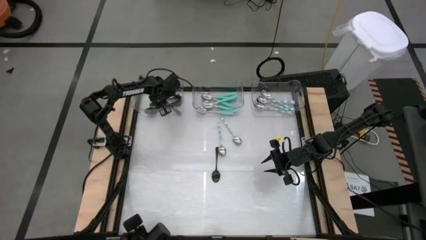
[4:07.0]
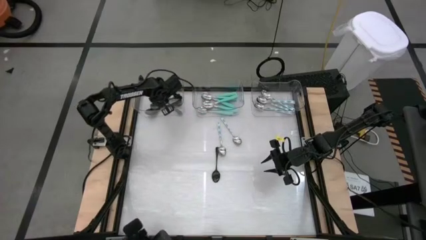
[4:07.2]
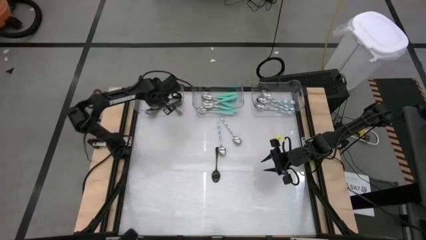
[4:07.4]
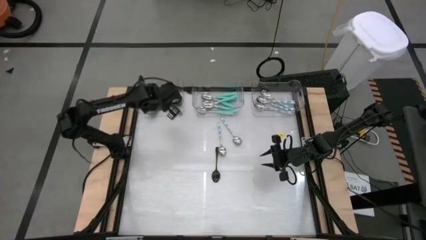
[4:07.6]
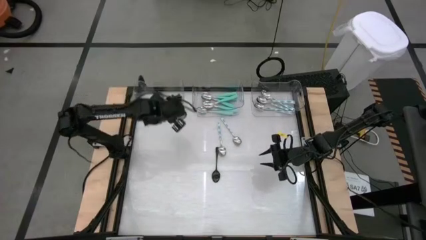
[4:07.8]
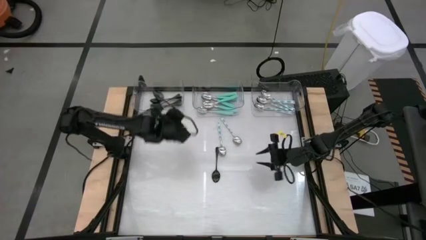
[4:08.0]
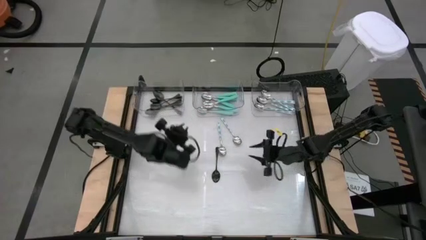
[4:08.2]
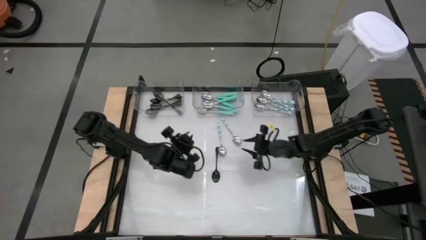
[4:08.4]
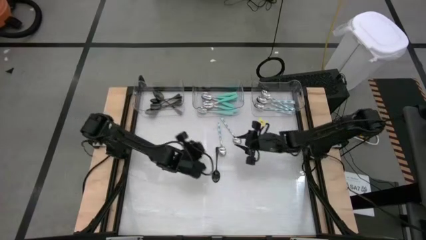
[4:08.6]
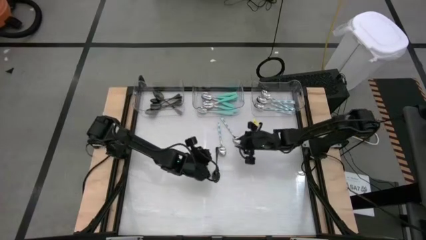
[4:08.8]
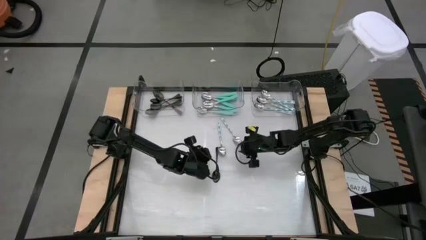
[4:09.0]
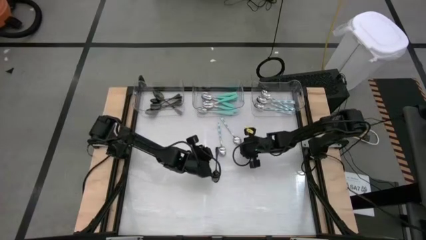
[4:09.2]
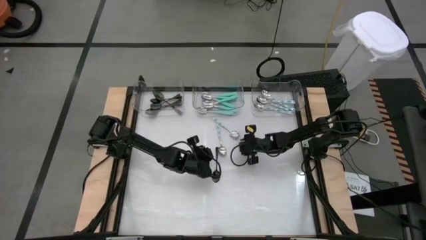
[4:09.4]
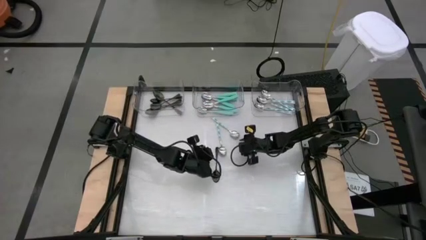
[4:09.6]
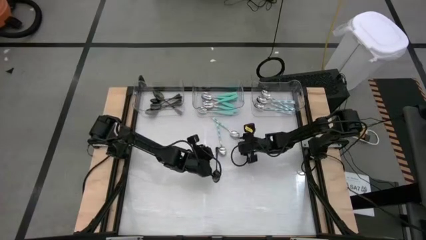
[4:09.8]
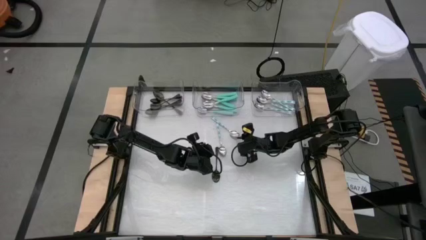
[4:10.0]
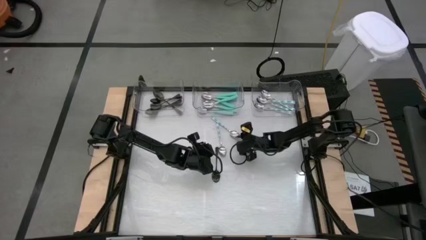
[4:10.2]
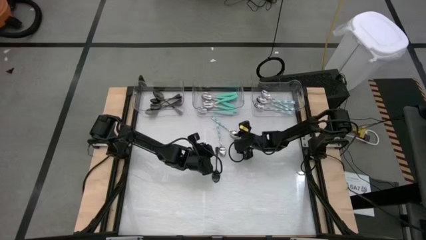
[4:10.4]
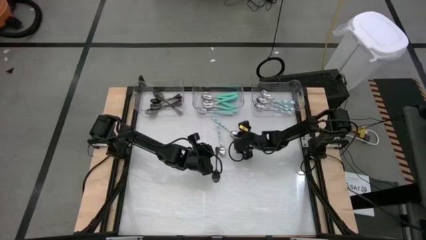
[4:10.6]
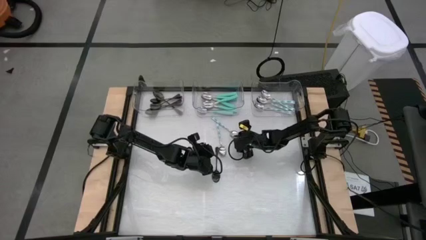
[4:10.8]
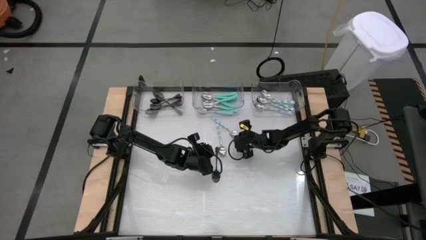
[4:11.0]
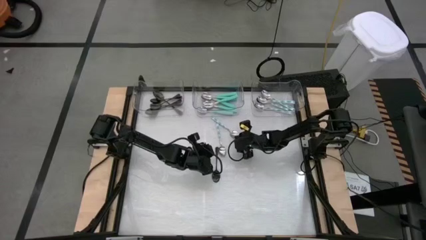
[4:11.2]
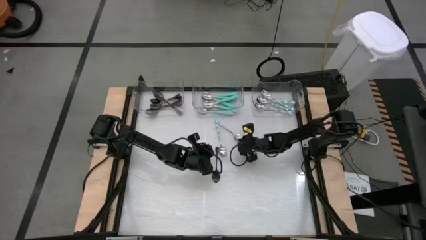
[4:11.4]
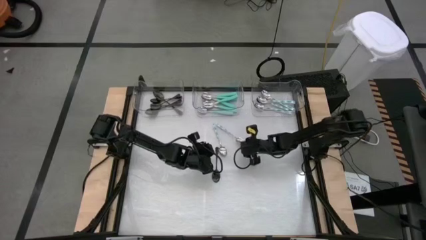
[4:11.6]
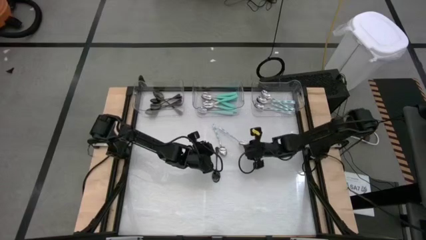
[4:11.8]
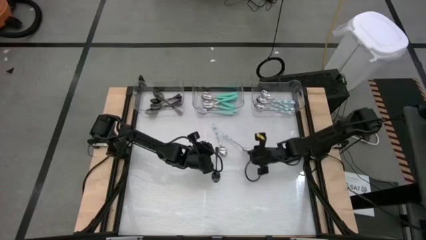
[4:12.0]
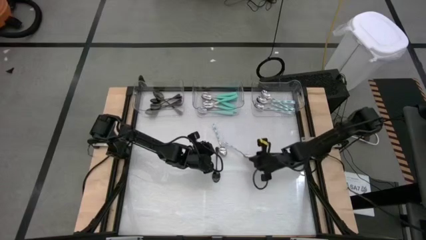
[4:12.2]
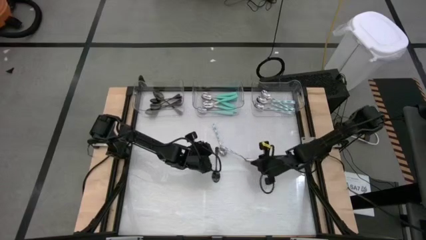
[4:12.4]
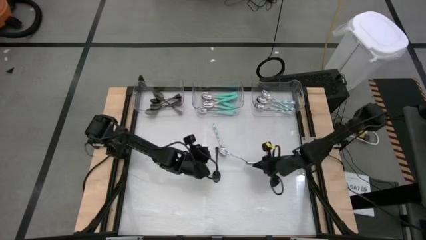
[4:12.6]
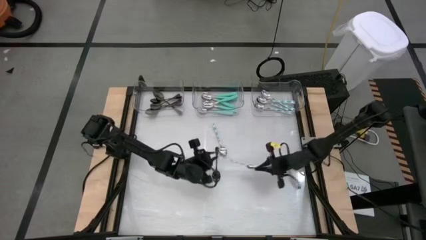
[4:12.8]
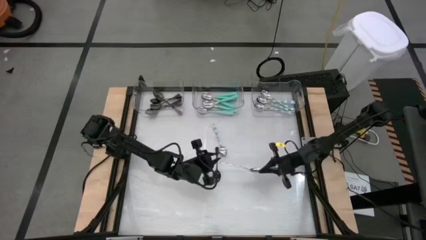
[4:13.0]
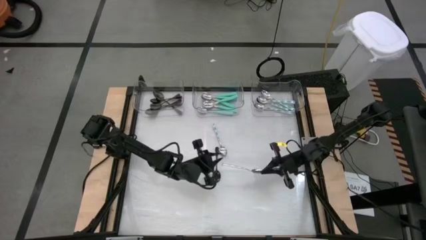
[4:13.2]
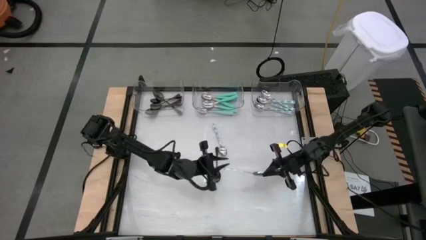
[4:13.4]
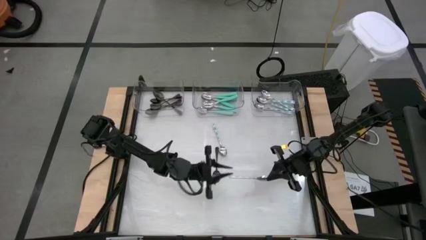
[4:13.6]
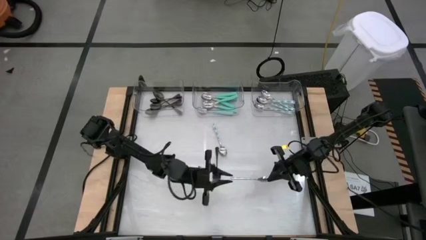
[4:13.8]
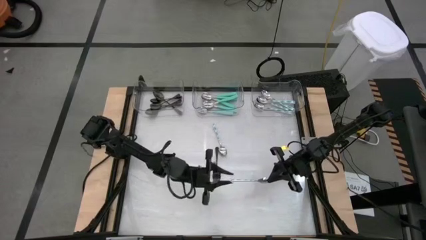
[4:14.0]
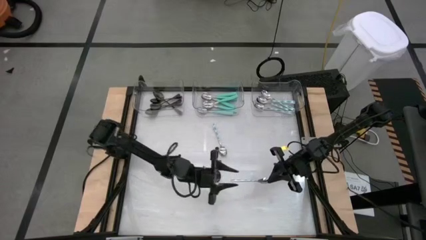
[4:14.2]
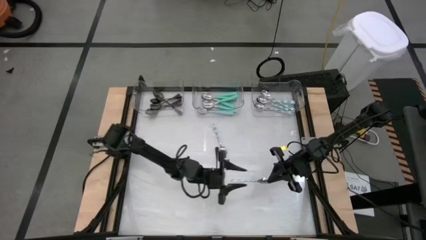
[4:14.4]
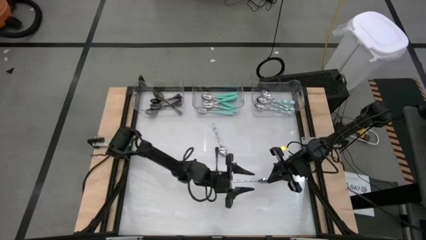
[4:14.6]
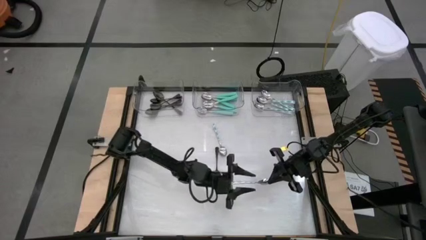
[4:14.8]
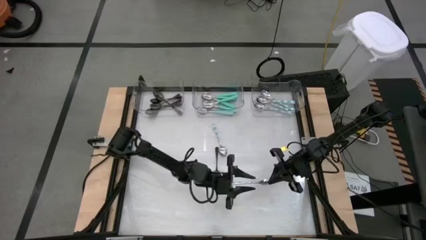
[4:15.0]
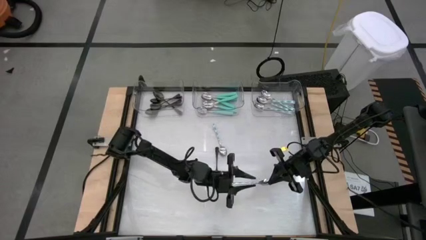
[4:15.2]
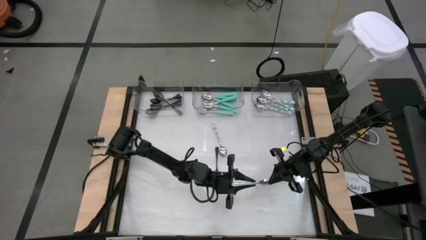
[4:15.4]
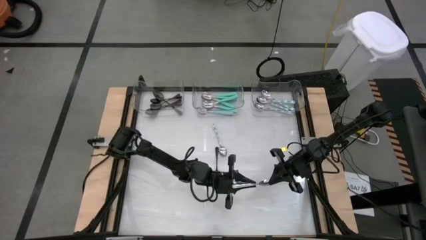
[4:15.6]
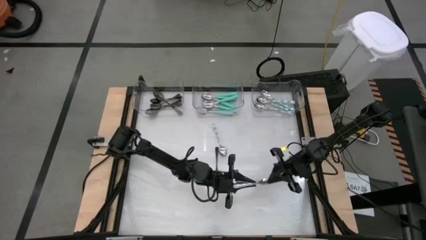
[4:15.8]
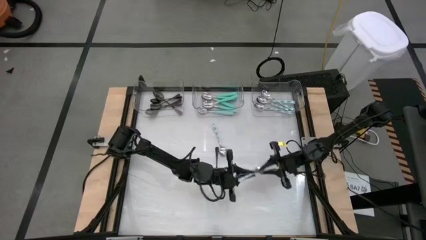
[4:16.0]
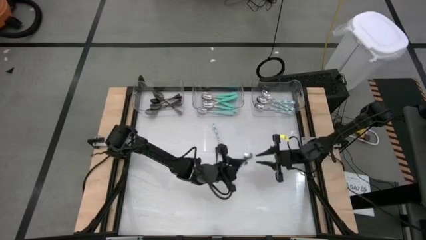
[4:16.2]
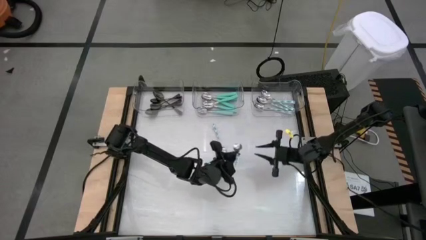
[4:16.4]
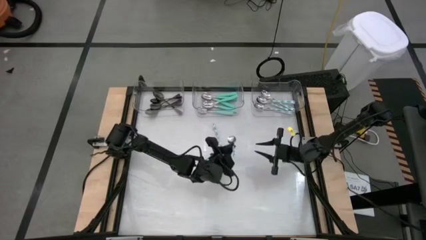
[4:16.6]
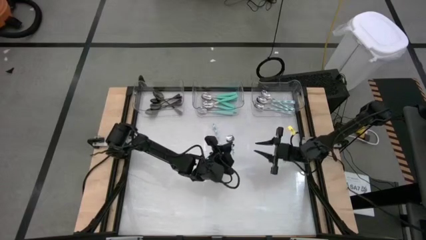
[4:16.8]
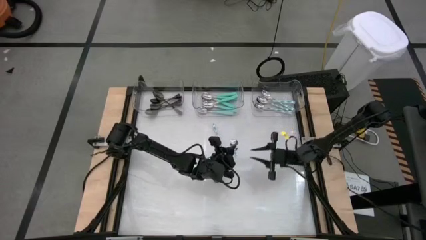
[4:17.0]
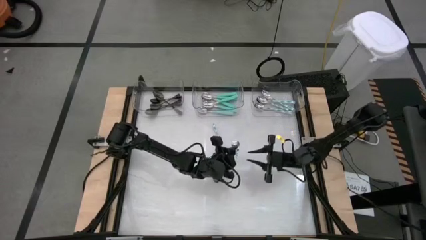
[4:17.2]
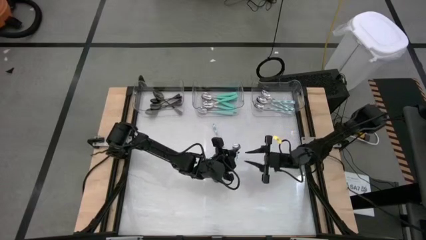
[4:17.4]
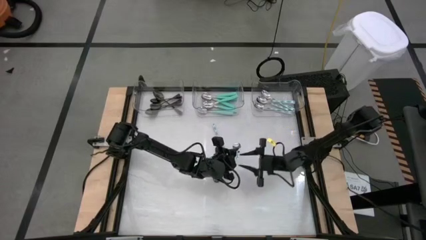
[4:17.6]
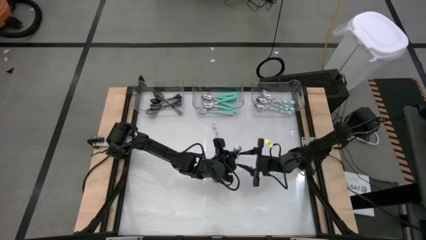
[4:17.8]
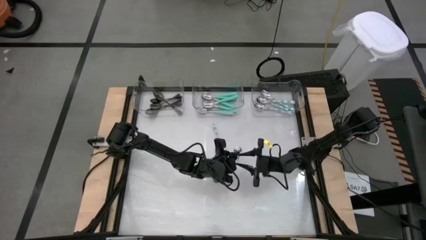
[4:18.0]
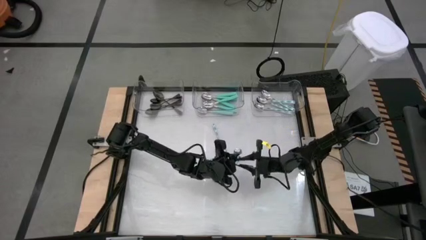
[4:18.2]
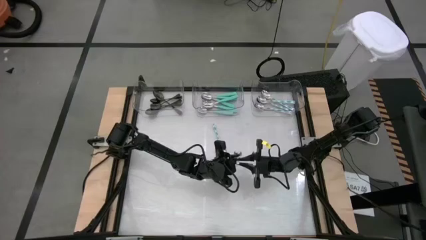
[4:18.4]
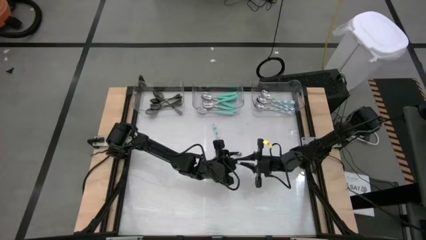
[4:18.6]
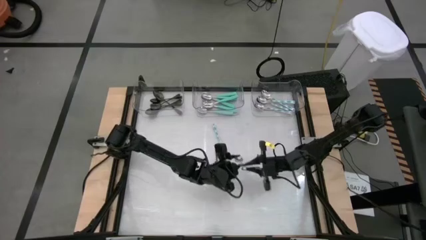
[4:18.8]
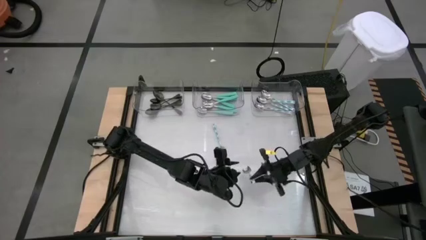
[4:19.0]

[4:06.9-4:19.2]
Task: Sort silverware by color (type)
Put the green patterned spoon into the right transparent bin
